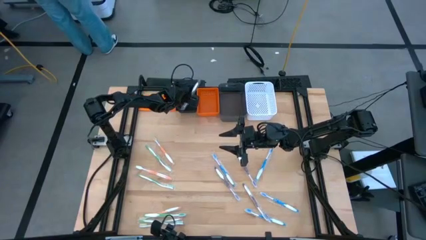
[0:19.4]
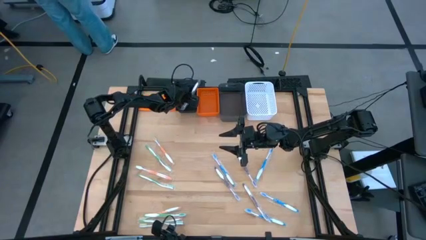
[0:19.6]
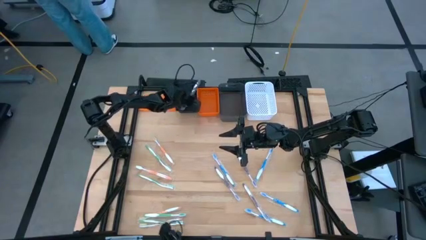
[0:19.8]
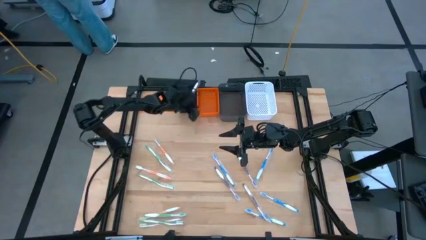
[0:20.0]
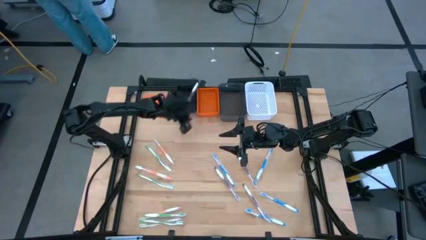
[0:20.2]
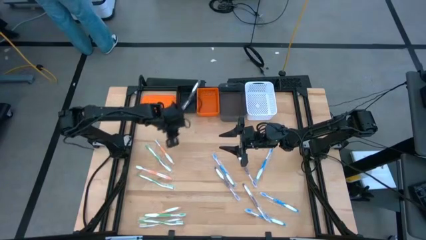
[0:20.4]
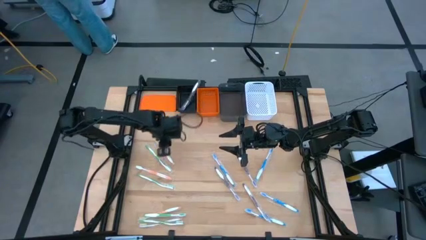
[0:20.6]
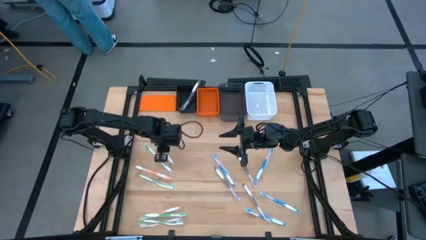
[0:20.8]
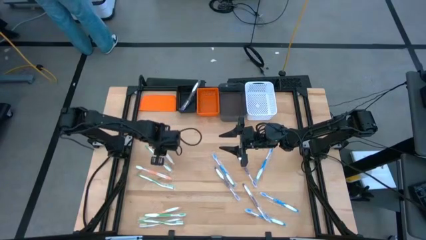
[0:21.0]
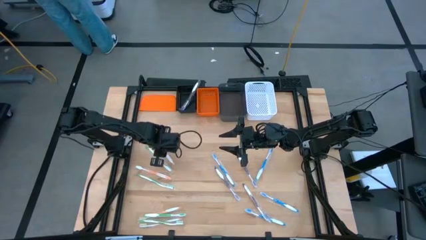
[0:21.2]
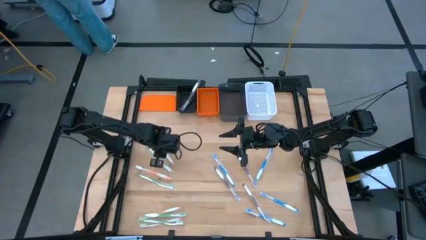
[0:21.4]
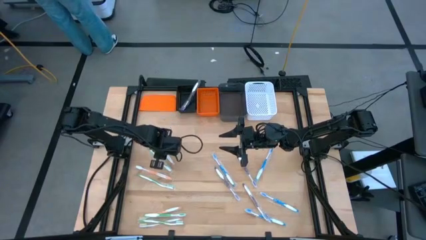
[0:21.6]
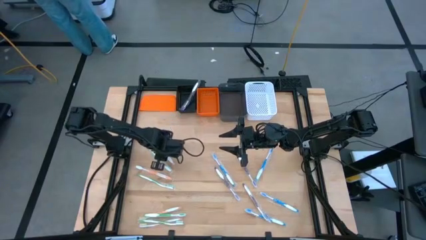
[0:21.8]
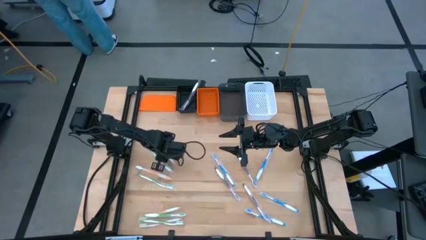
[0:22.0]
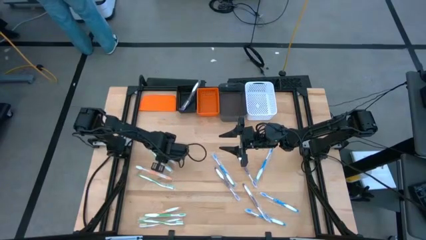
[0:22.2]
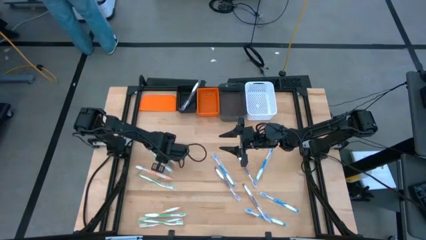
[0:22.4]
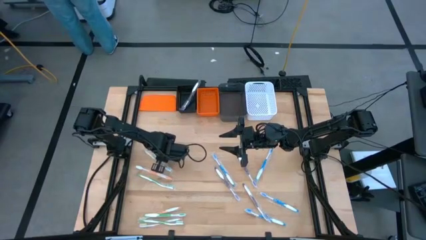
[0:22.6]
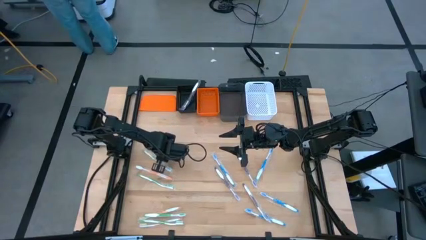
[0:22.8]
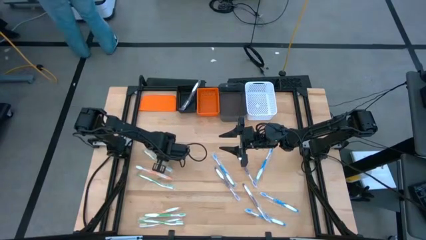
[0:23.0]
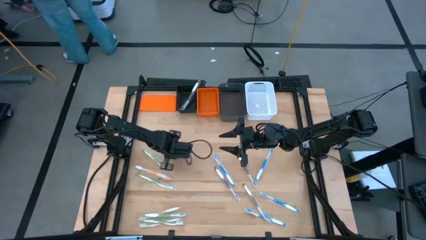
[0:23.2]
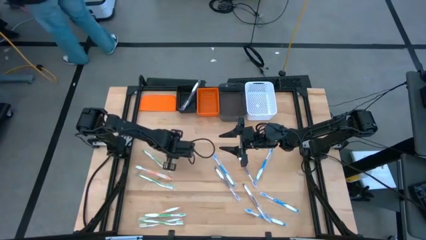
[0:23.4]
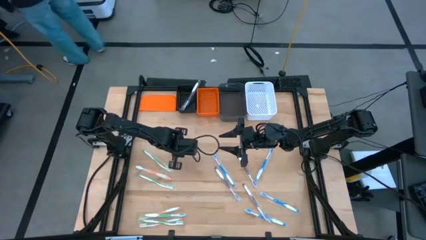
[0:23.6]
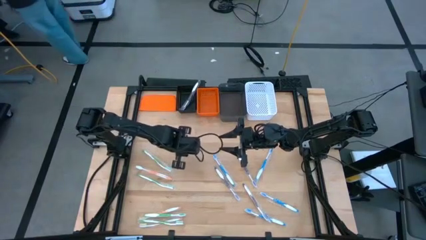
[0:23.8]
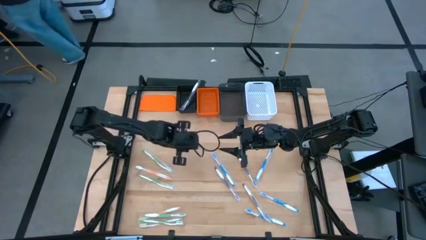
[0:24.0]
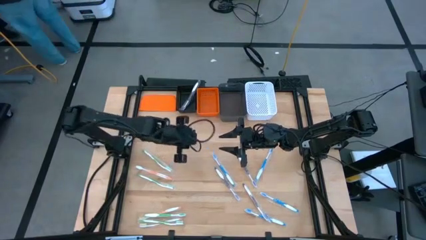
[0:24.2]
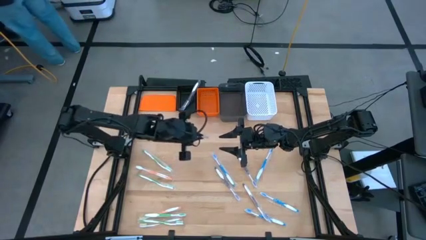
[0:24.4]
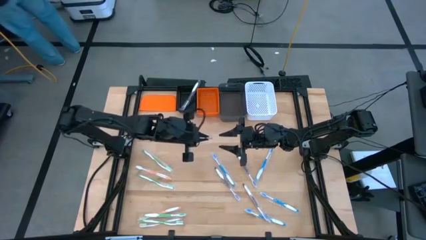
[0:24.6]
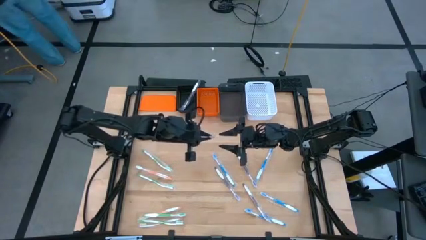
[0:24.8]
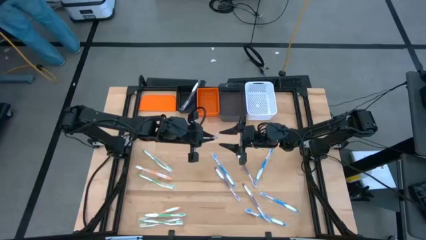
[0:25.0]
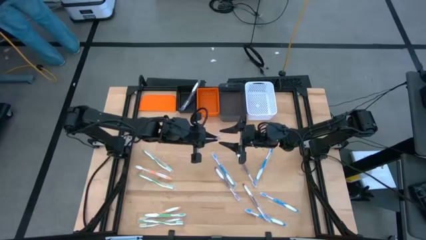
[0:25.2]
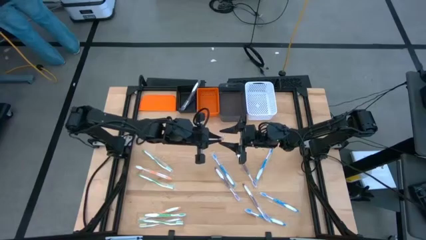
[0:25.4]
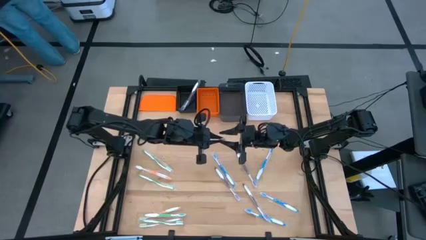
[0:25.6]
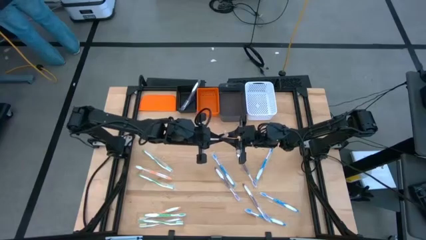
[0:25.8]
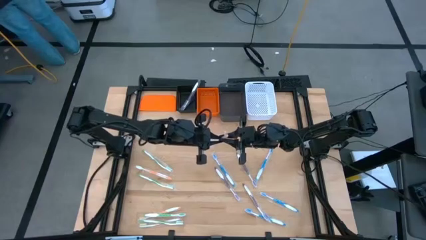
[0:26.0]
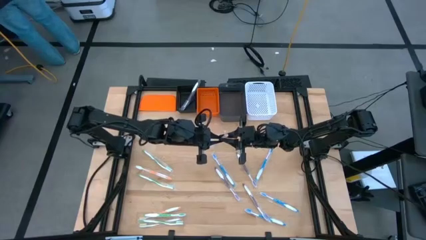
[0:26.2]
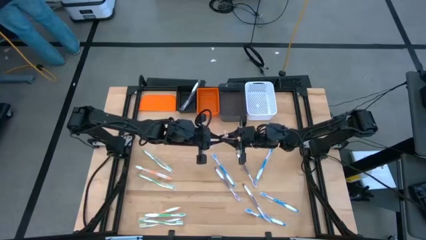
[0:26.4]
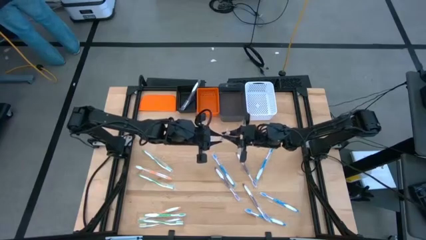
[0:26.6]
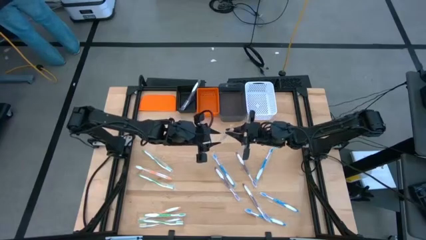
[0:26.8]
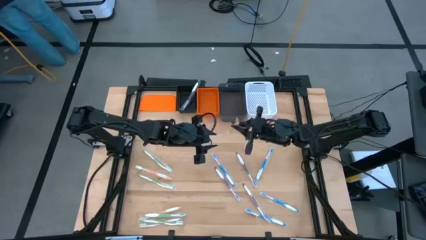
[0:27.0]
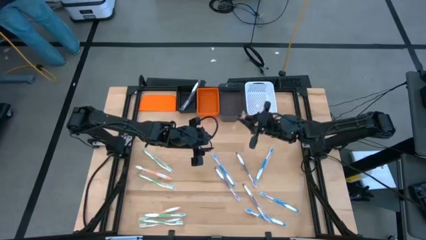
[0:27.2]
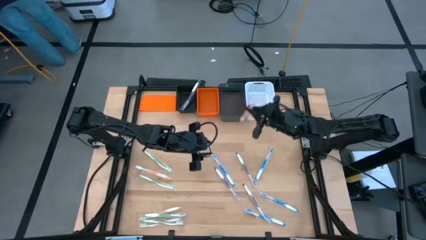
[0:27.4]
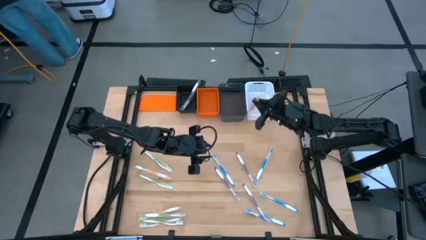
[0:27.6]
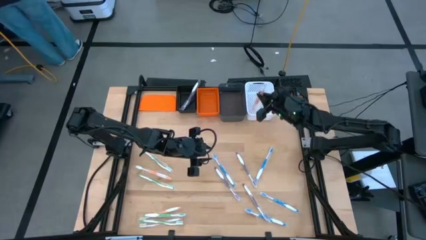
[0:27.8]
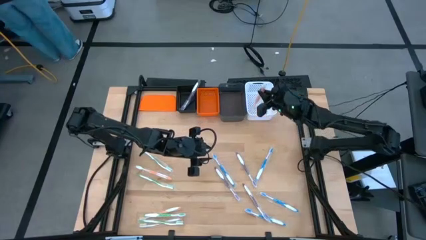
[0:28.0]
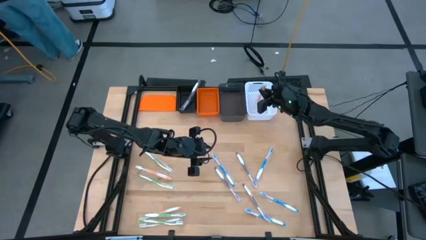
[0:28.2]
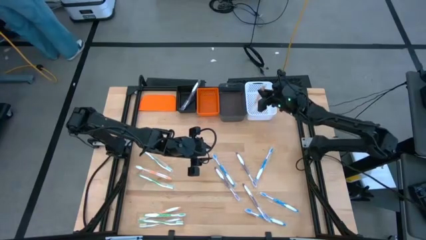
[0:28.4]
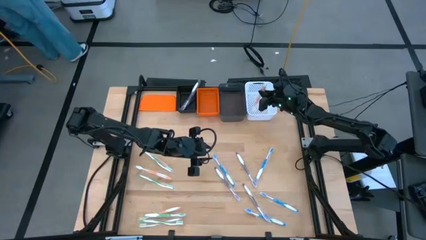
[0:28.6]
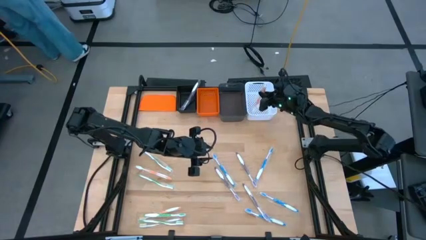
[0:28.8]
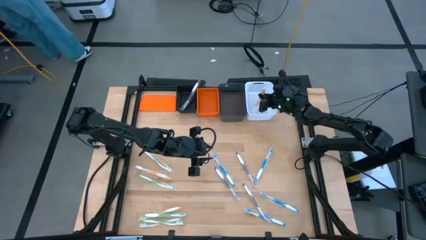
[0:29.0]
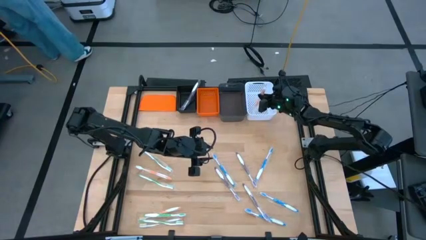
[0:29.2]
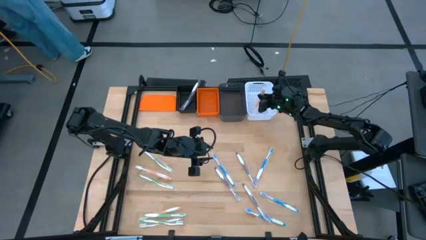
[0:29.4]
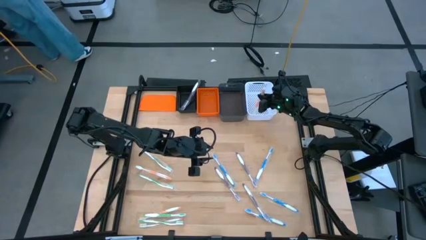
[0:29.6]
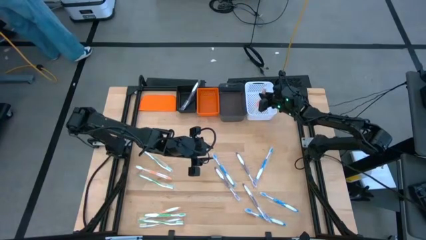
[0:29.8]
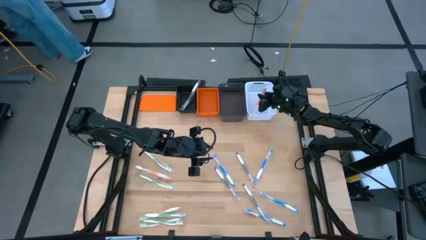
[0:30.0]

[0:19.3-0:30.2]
Task: Pick & Place Toothbrushes
Put the orange toothbrush into the white bin
